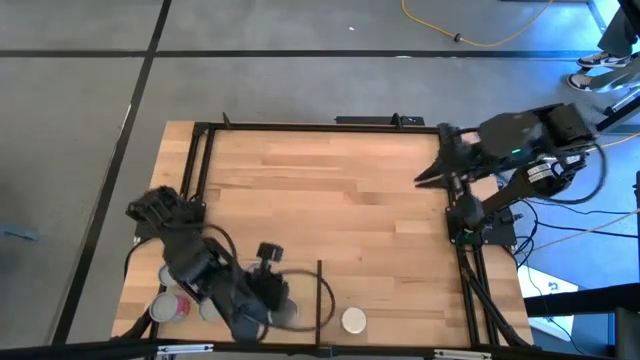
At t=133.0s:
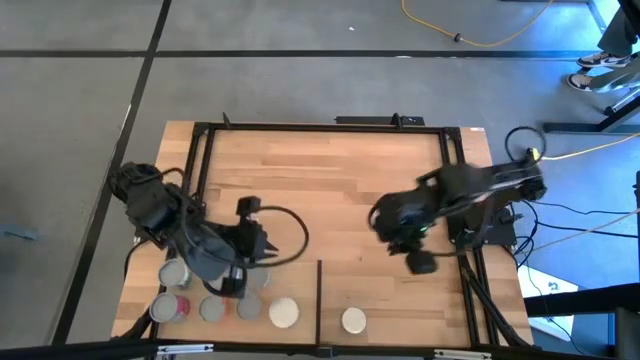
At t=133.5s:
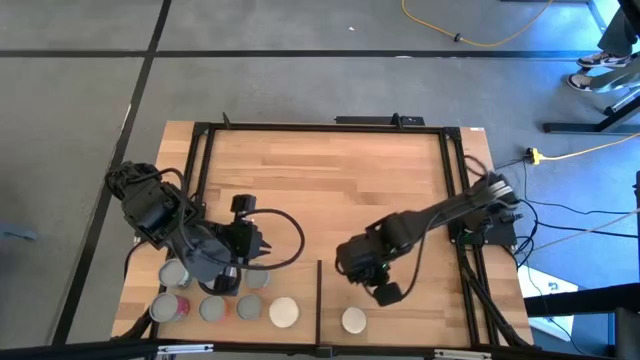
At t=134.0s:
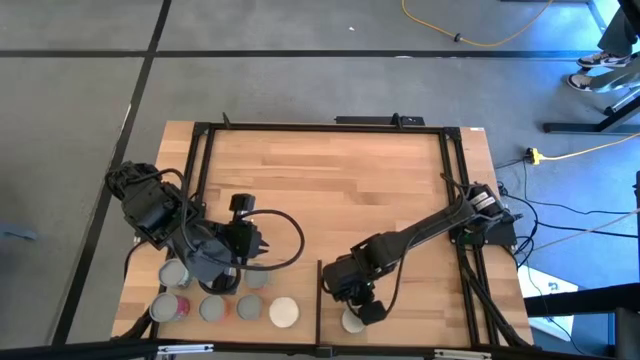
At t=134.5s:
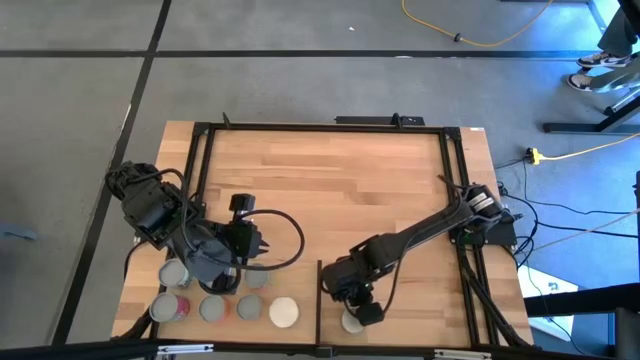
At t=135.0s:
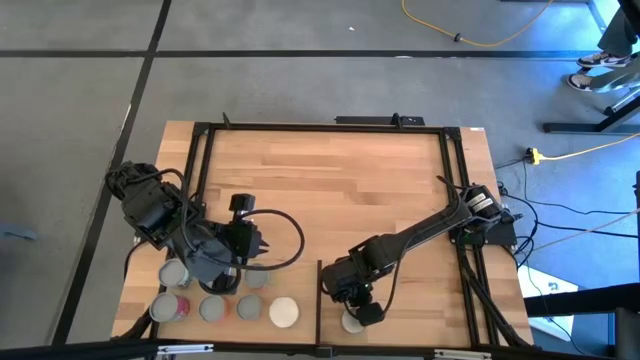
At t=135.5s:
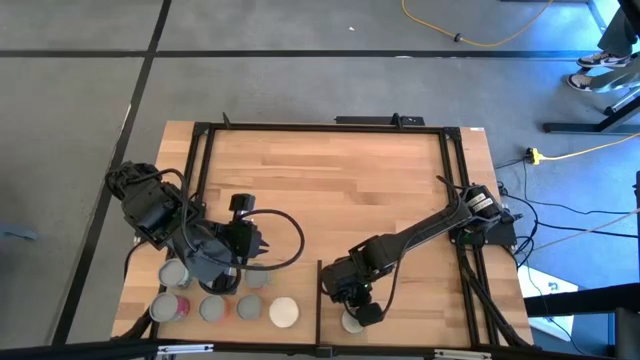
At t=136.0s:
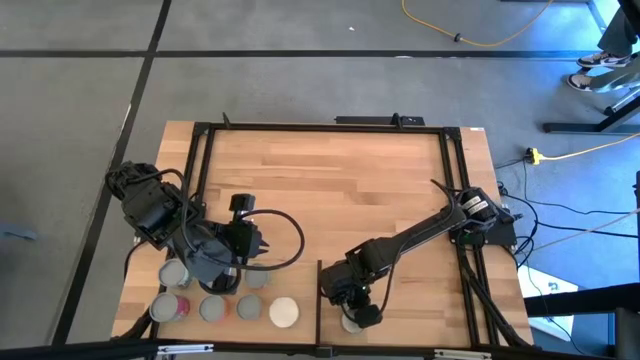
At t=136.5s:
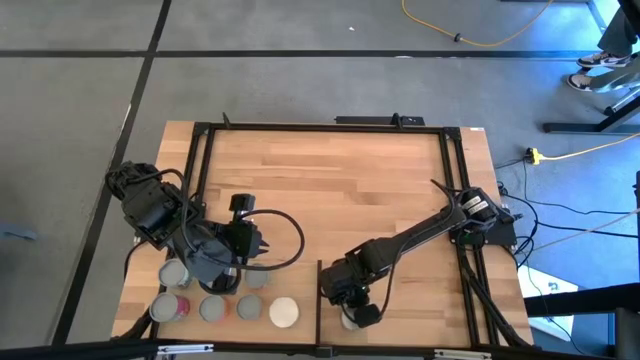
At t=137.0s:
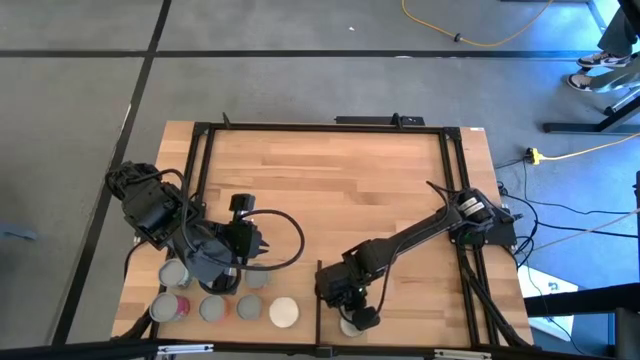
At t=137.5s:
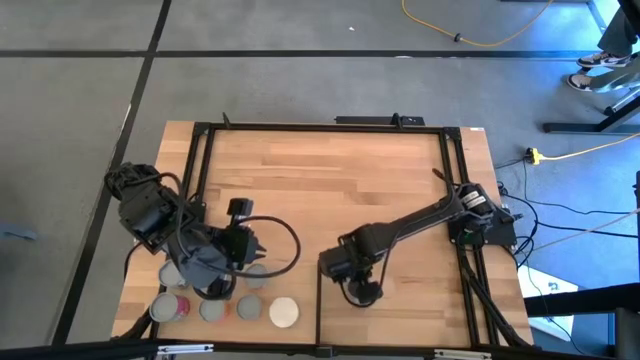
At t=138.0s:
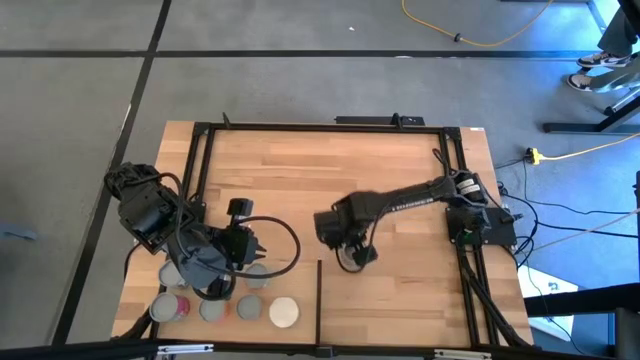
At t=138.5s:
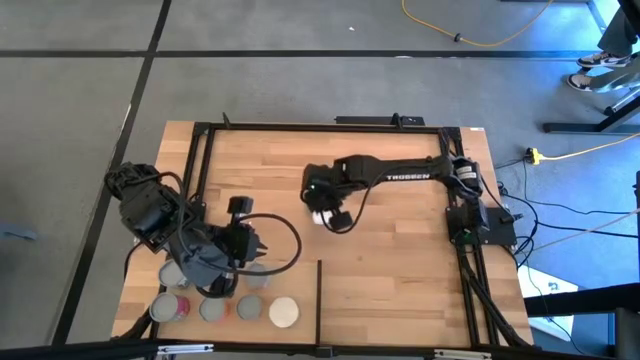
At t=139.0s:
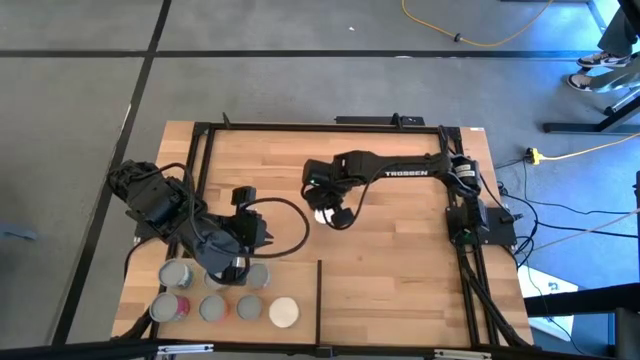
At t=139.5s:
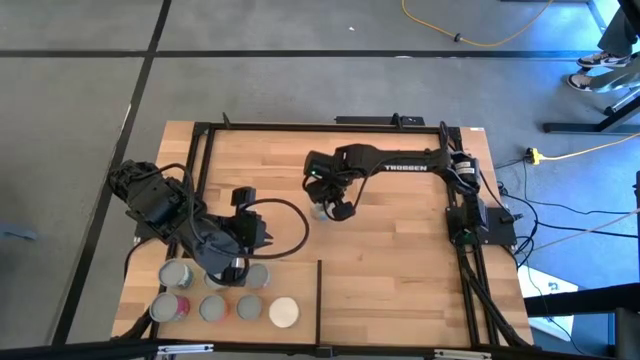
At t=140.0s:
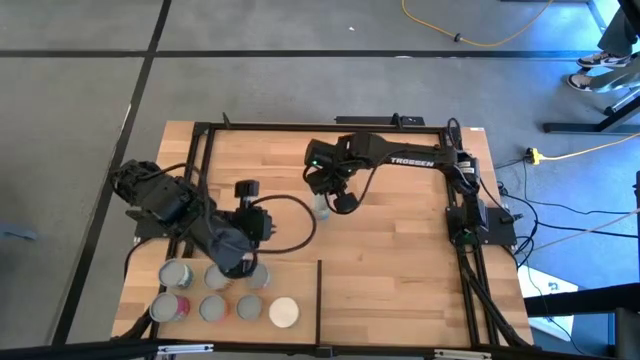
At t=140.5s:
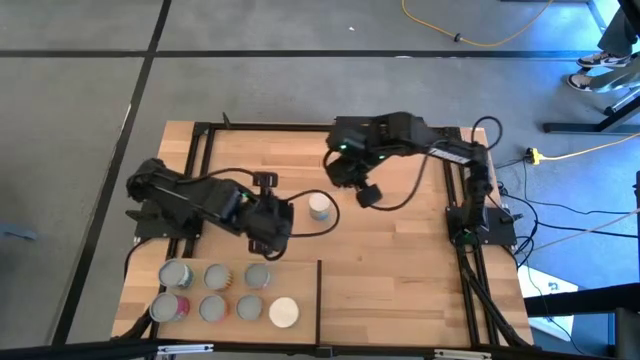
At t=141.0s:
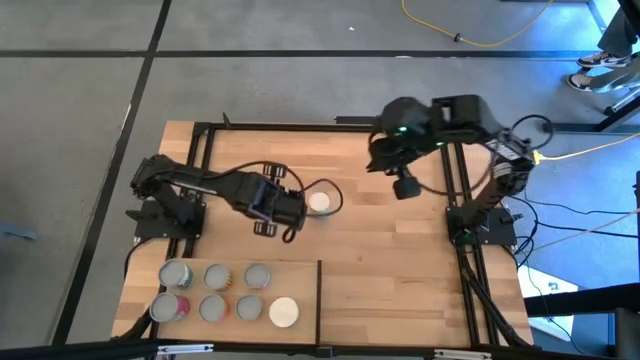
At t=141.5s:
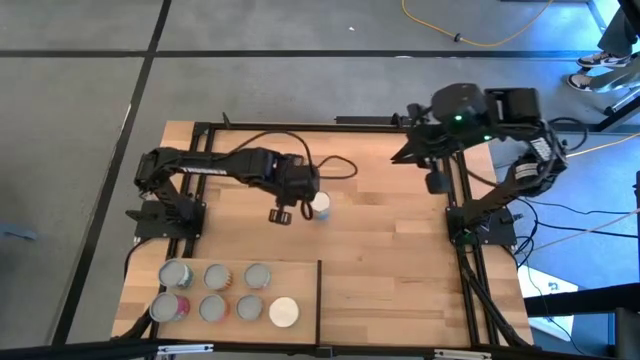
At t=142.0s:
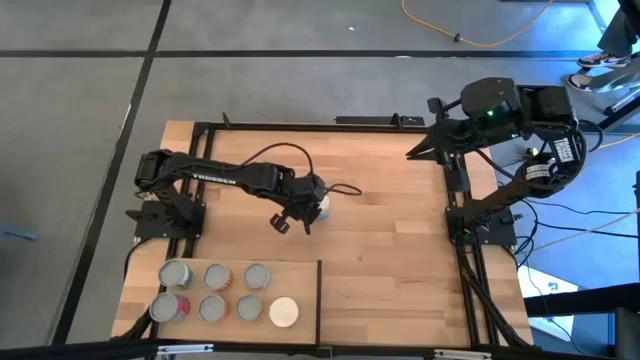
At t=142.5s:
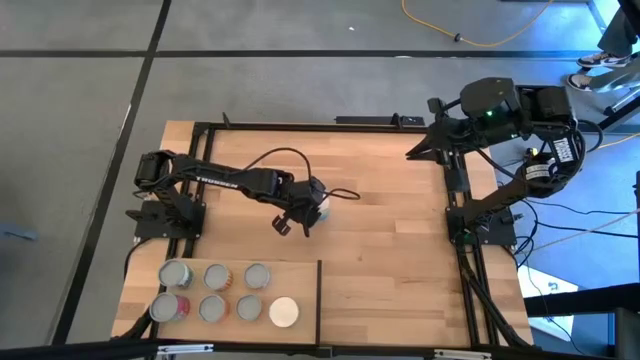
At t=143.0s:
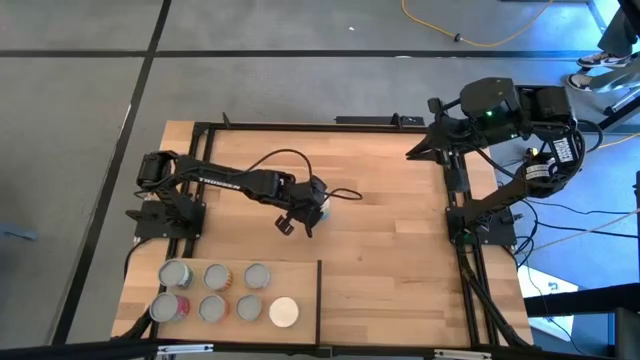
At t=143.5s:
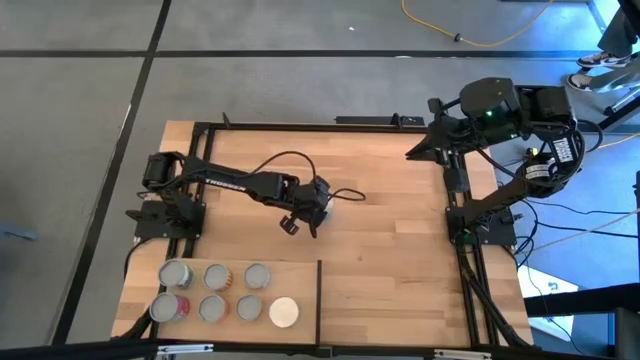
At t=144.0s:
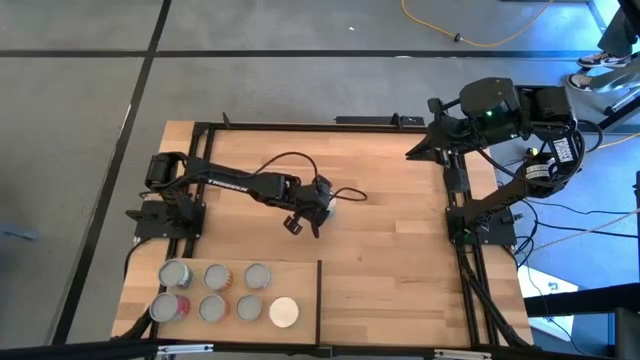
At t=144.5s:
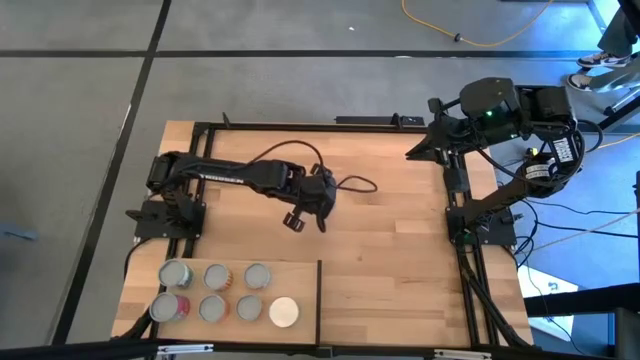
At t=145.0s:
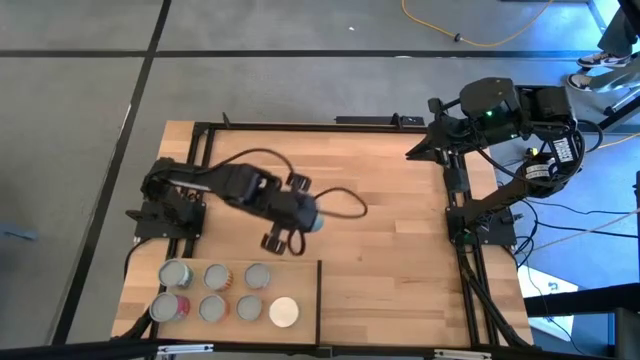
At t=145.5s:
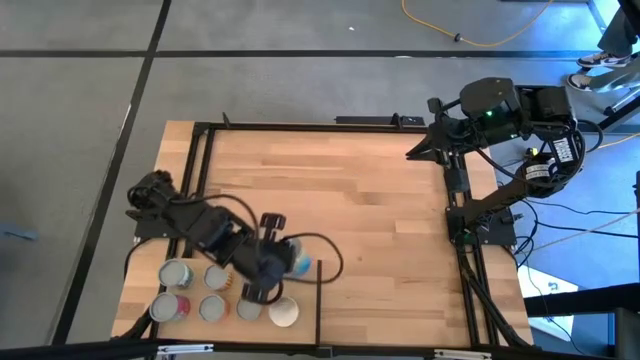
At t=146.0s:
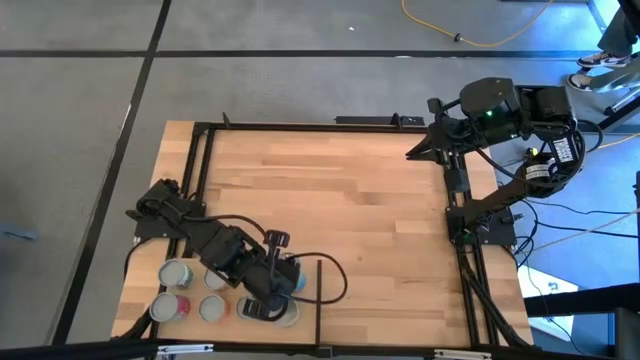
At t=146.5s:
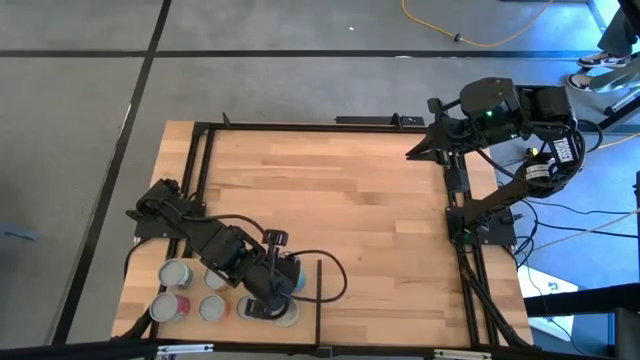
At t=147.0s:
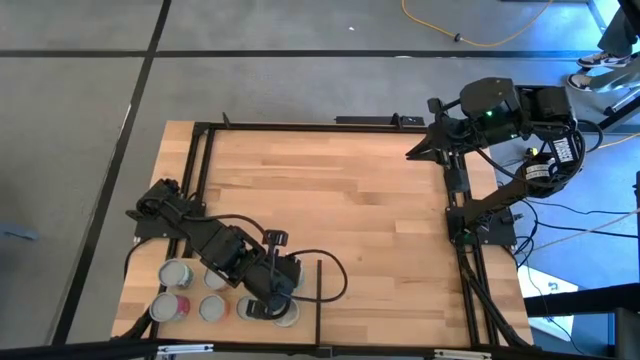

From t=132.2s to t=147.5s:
Task: Pick and place cans onto a shelf
Put the canned cherries on the shelf

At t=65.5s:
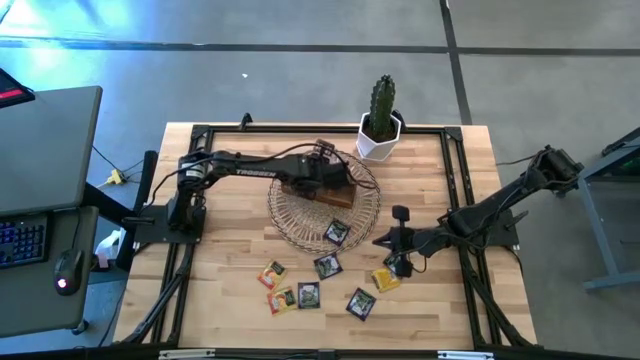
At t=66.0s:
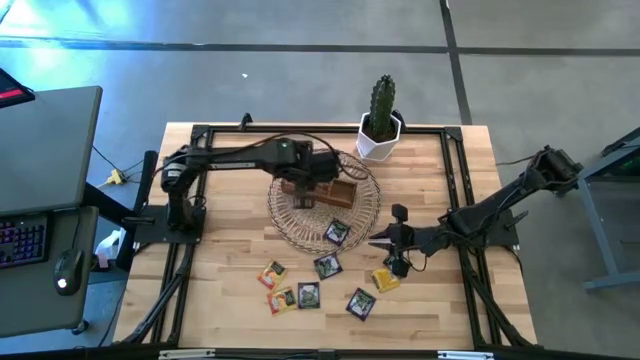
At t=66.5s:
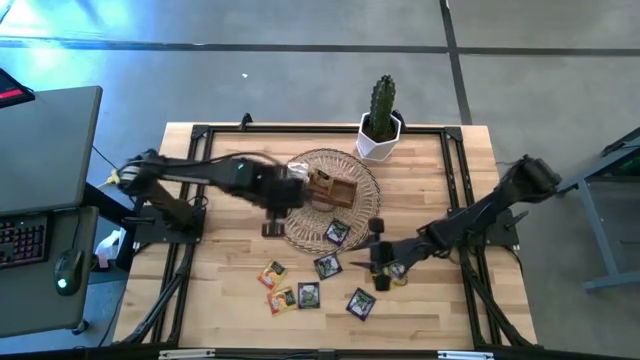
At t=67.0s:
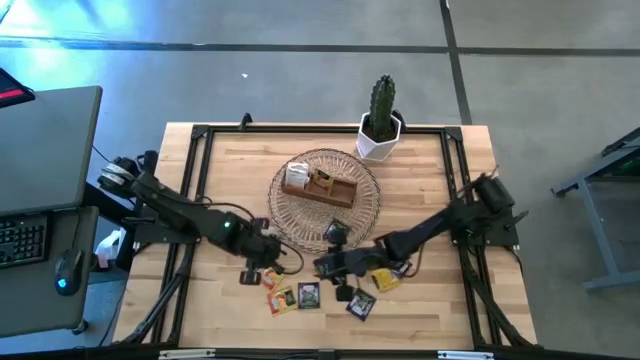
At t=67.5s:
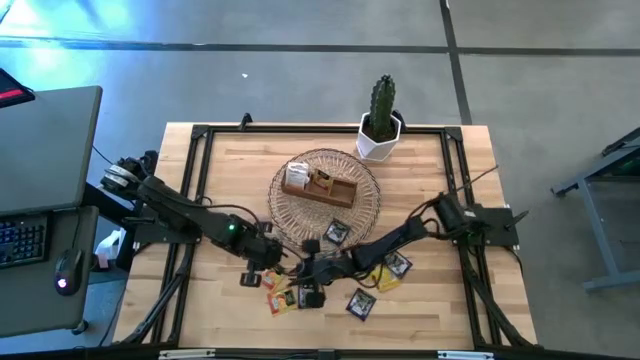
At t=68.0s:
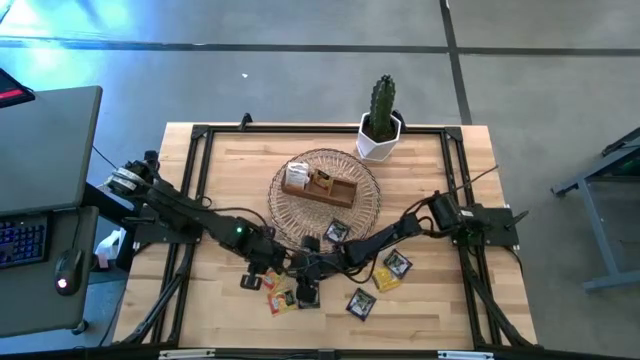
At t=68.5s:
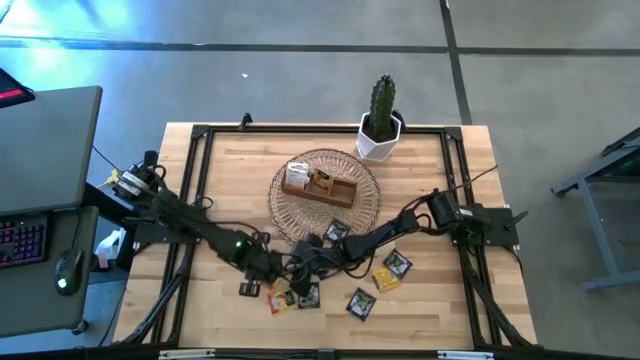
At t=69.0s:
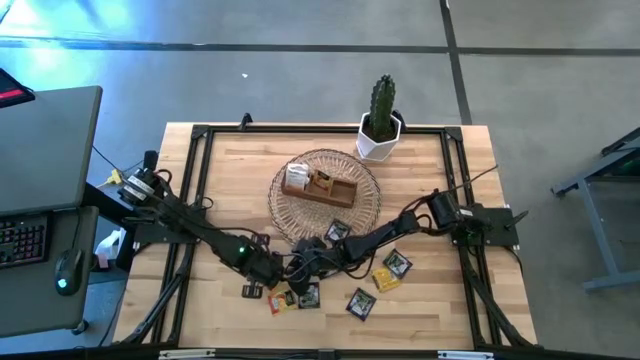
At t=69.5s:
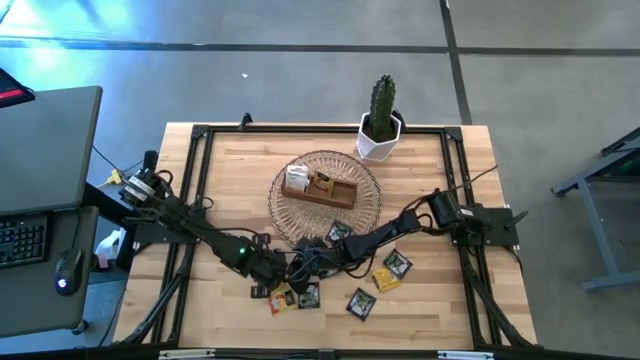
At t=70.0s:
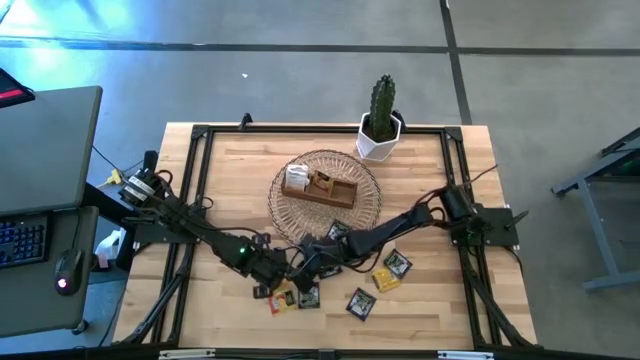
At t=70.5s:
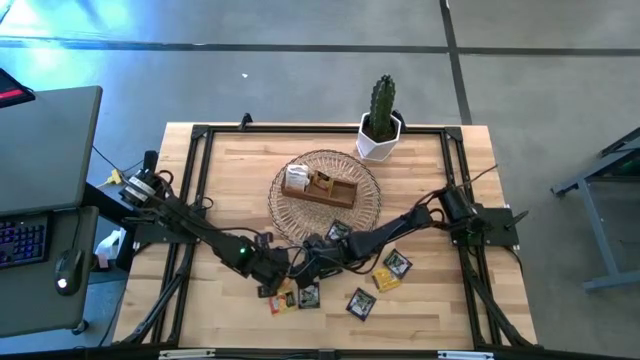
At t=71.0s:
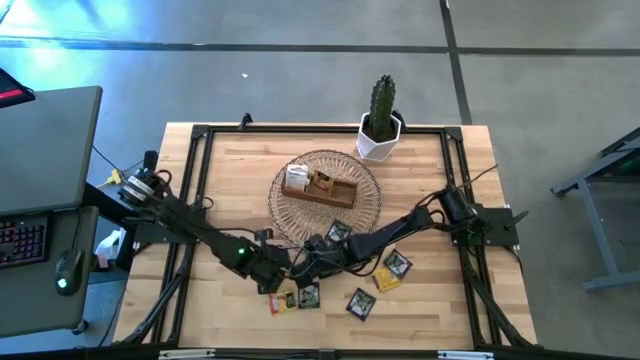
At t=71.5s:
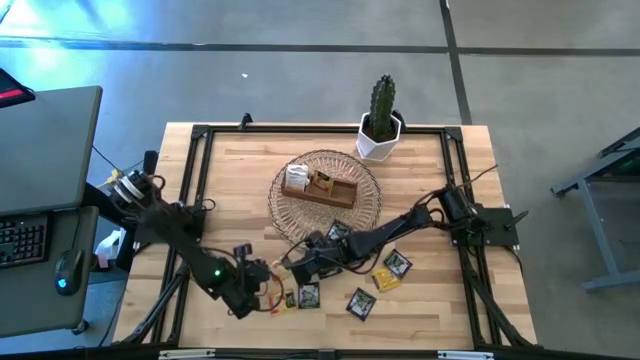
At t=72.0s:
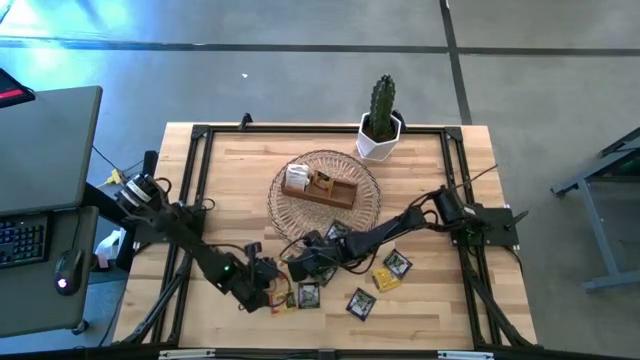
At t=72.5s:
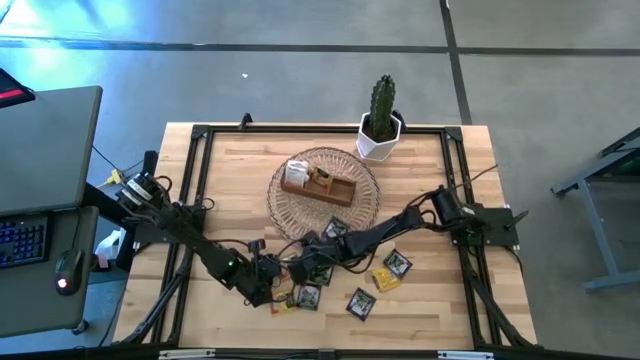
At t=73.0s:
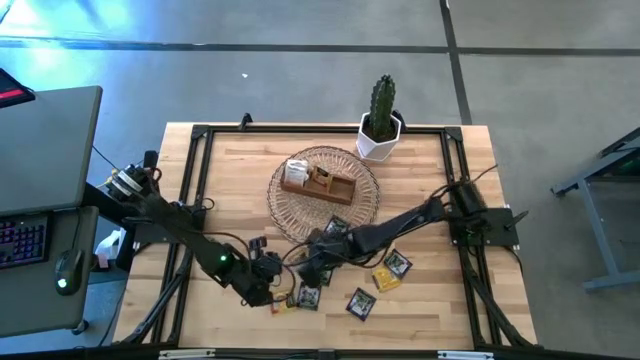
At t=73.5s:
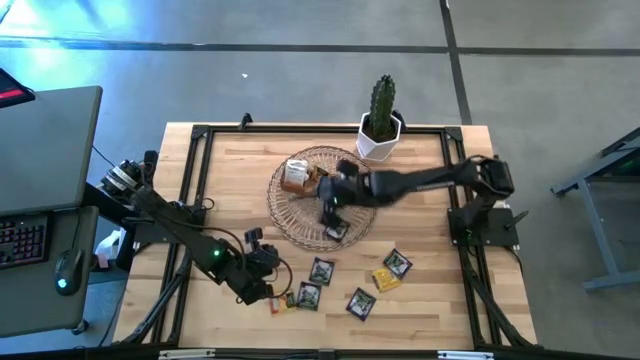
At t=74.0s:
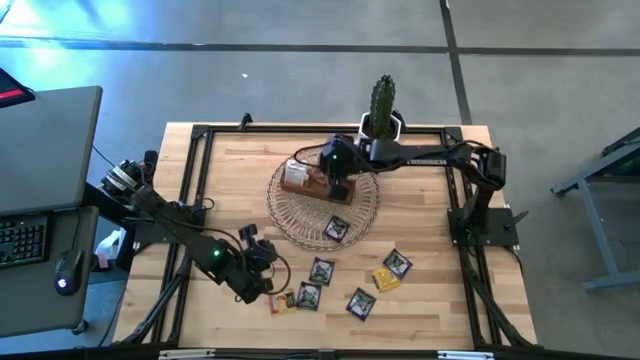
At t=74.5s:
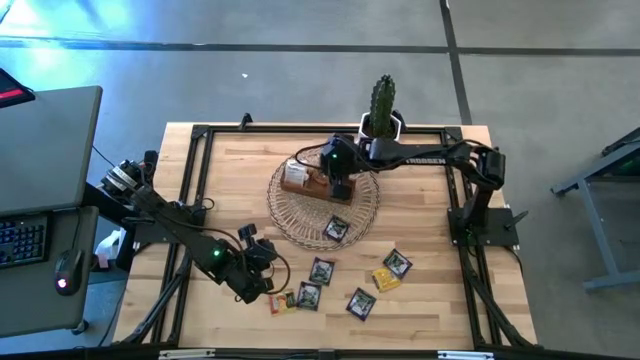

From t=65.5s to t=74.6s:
Task: Pick & Place Tea
Put the yellow tea pack into the middle section of the wooden organizer
